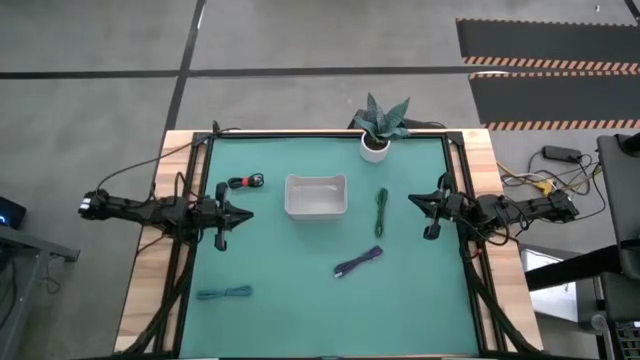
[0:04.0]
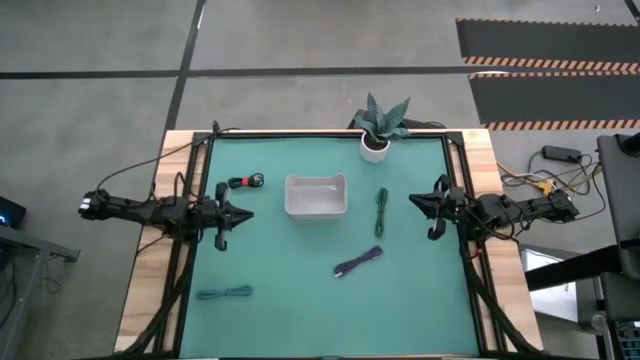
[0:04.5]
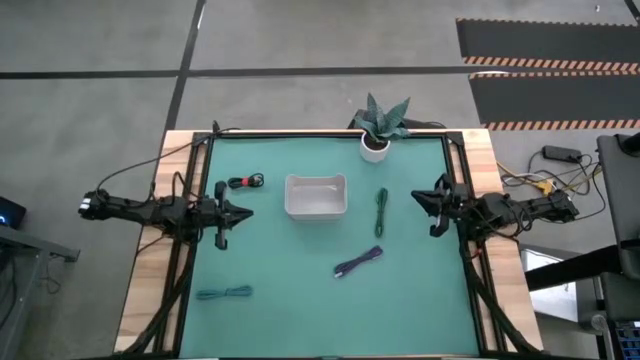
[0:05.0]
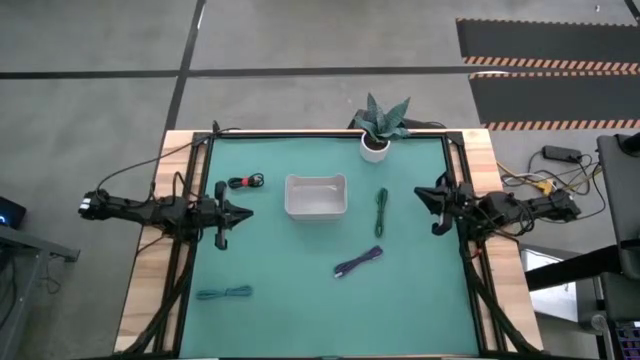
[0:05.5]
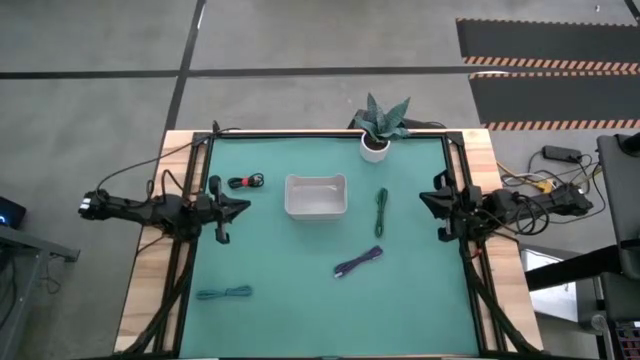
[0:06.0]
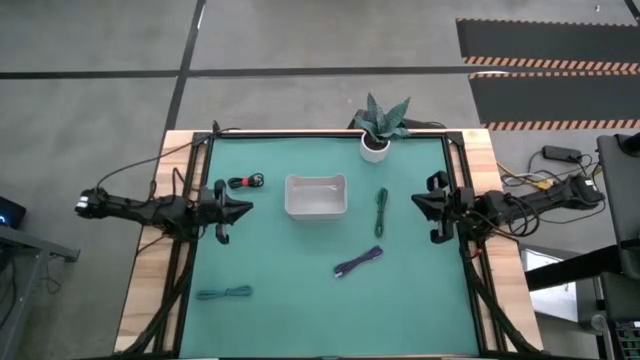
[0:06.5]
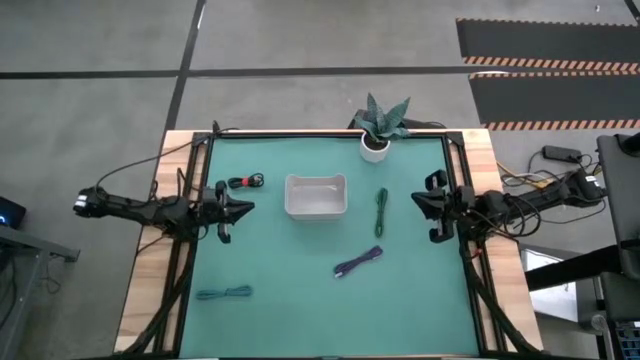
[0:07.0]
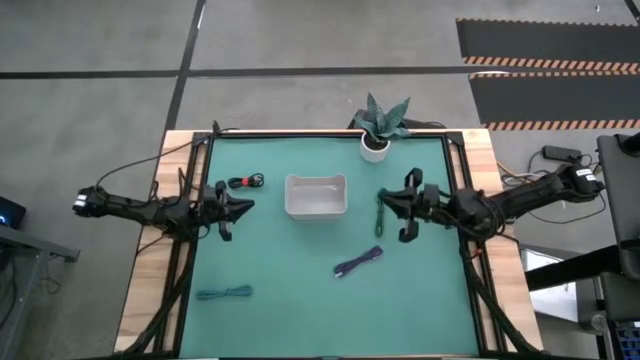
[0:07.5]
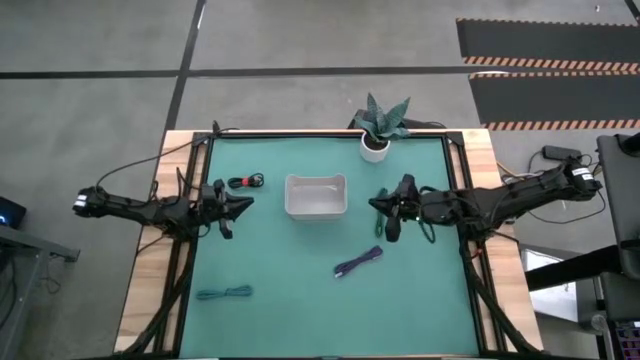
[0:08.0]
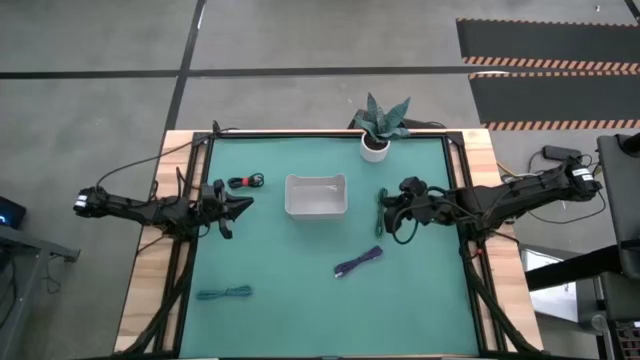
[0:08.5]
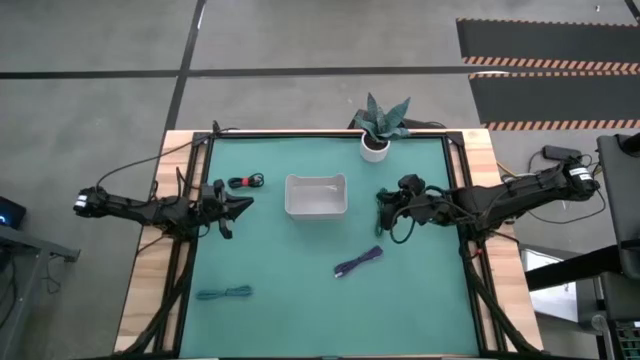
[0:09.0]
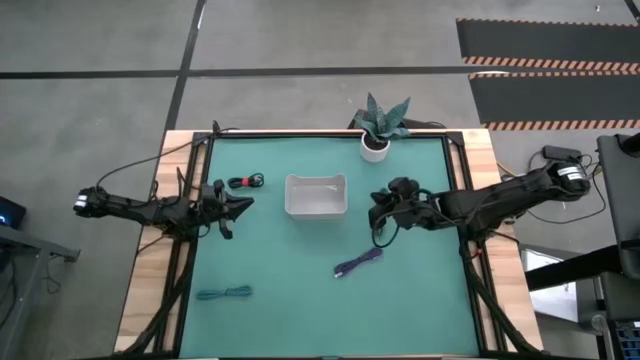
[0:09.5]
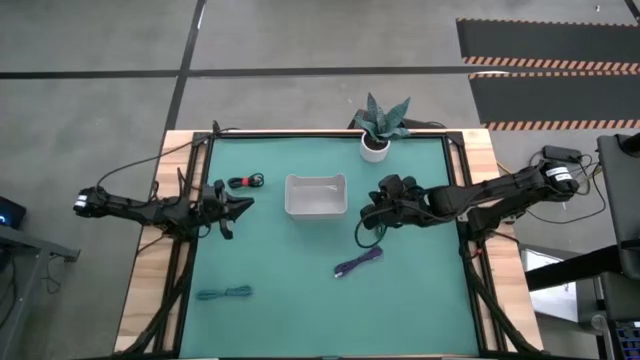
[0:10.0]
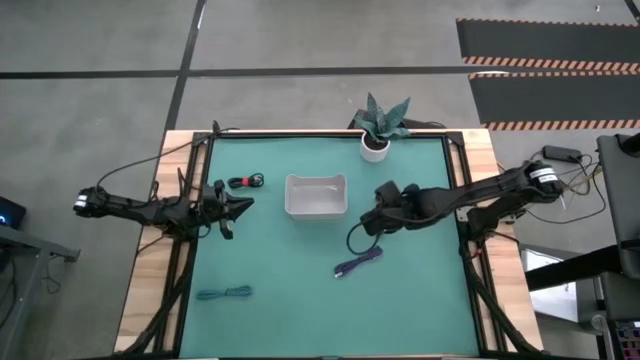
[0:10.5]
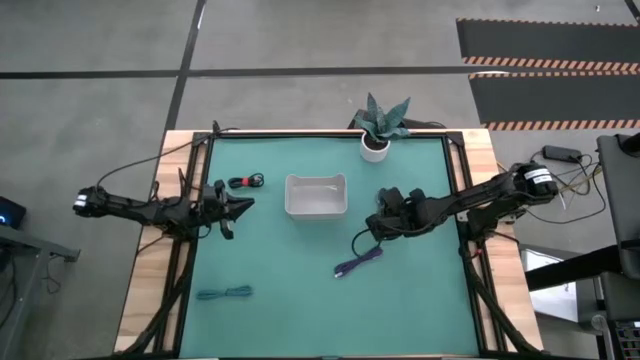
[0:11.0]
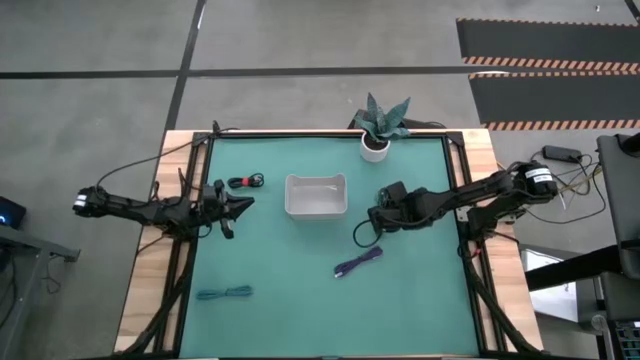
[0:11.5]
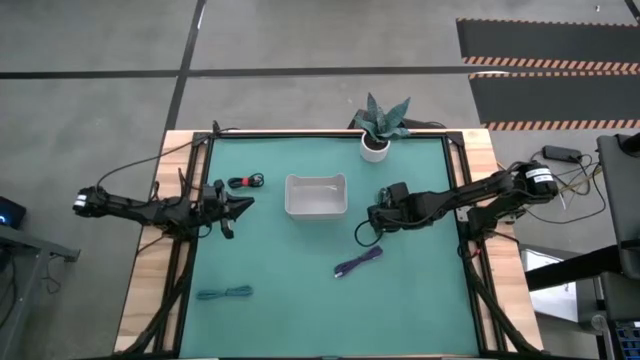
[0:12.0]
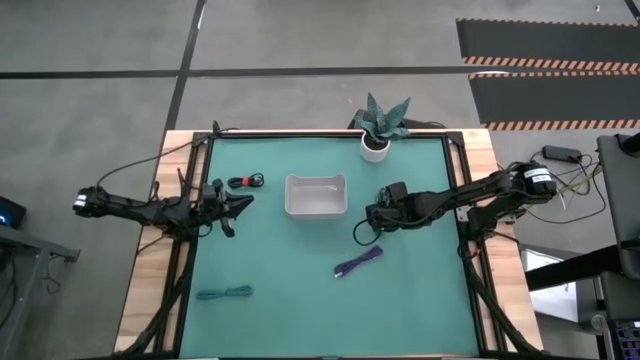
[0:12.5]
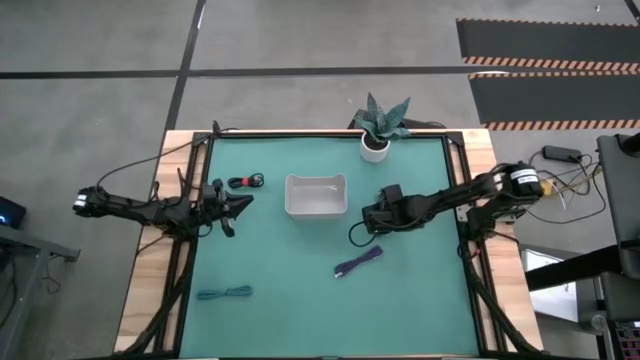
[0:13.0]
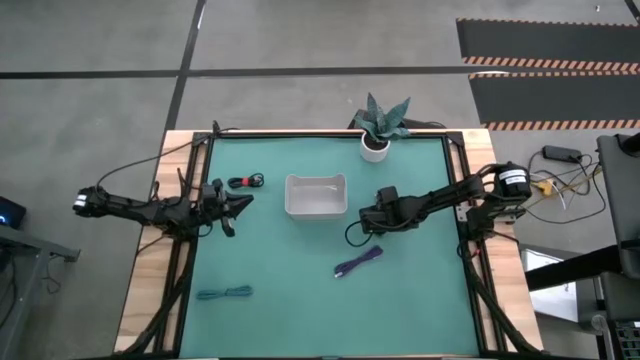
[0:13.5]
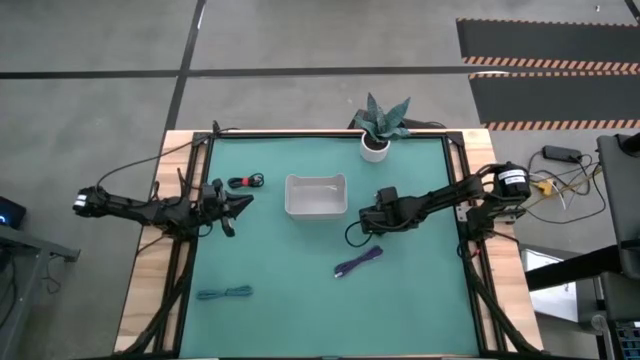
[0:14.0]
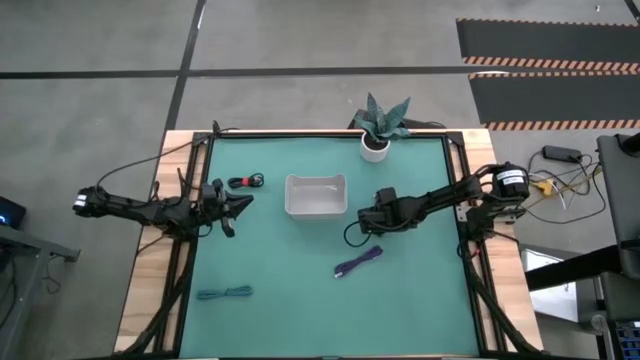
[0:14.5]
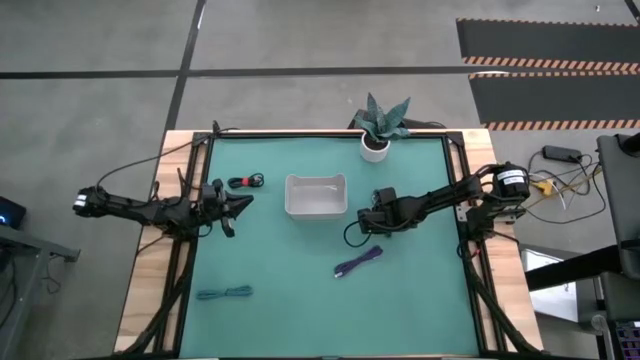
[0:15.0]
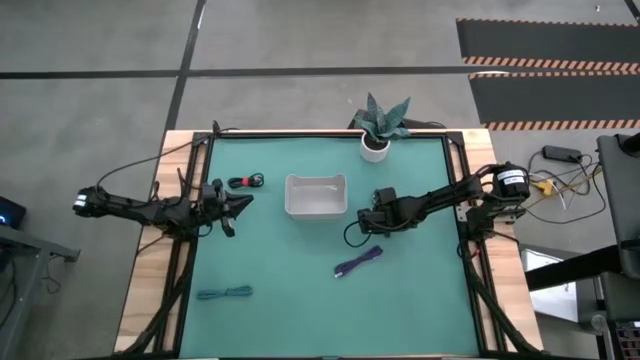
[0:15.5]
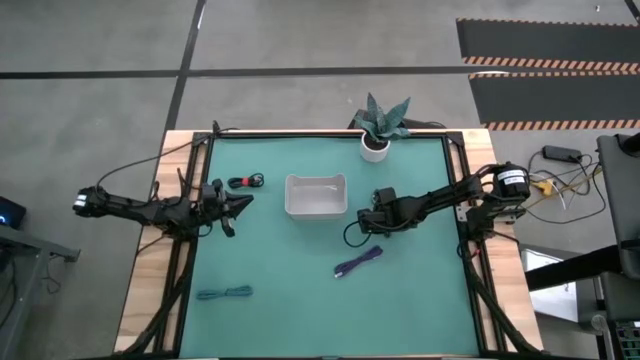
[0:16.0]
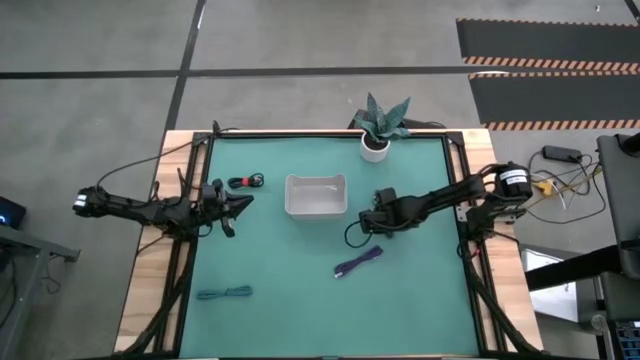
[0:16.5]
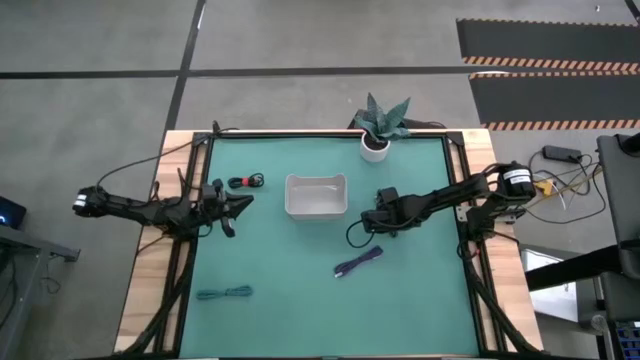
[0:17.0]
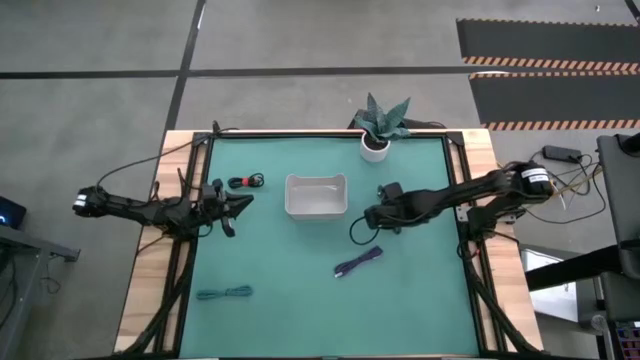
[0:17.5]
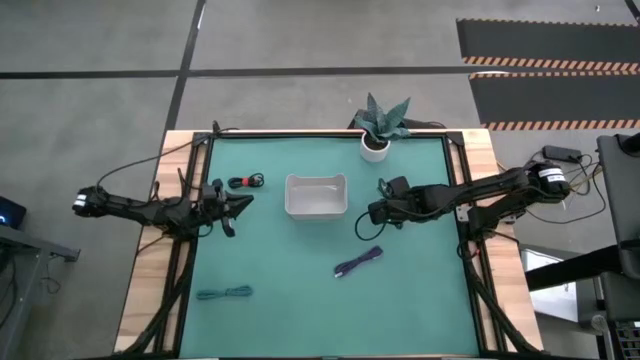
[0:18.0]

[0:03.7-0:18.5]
Task: Pick and place USB-C Cables
Put the green charger cable into the white bin

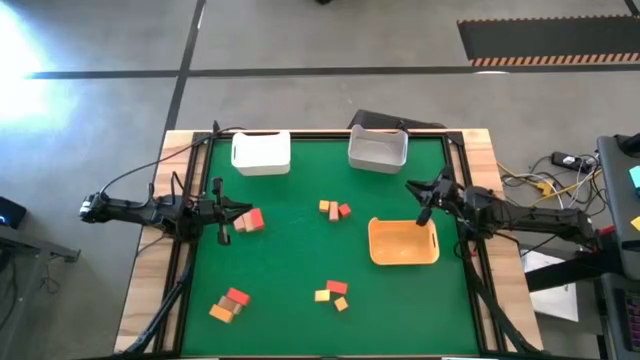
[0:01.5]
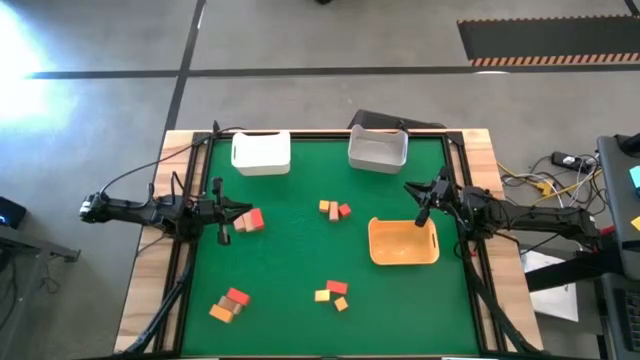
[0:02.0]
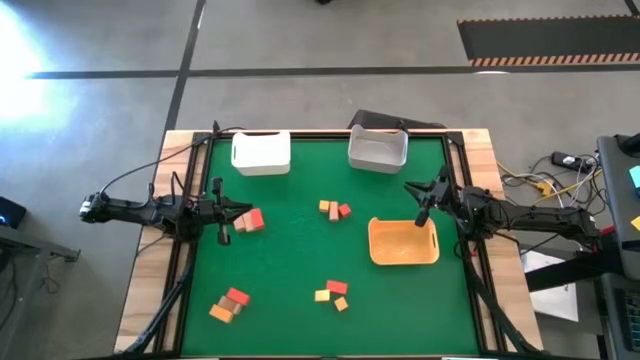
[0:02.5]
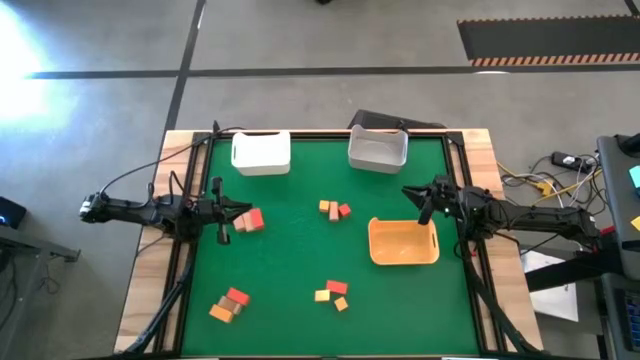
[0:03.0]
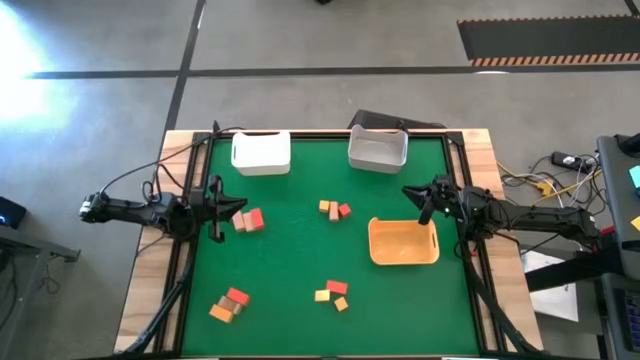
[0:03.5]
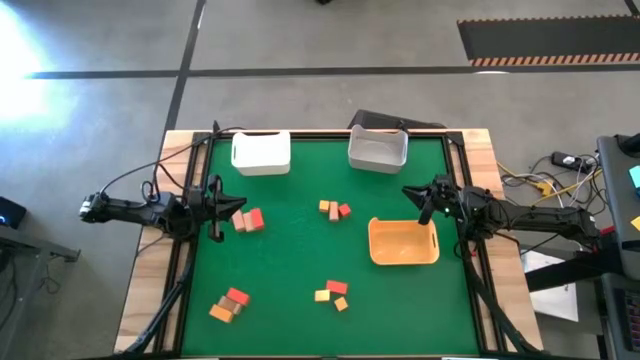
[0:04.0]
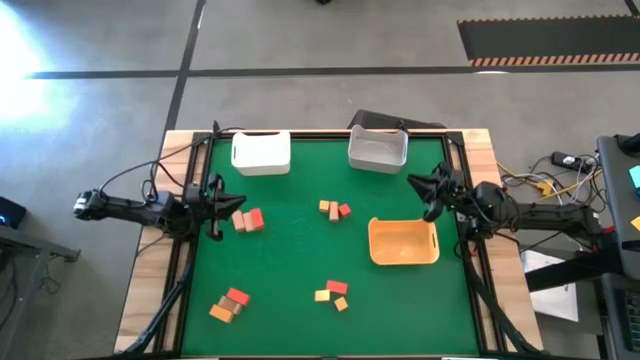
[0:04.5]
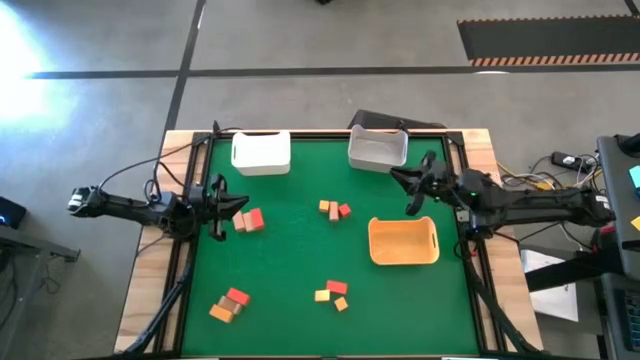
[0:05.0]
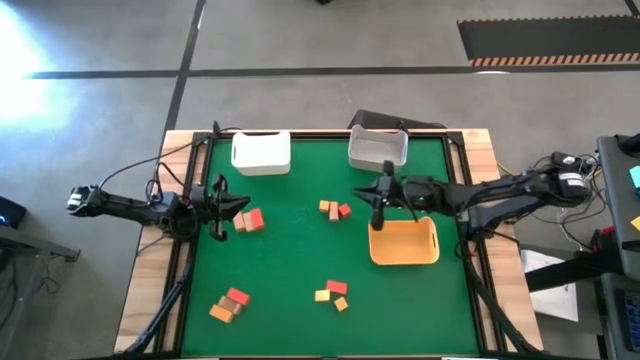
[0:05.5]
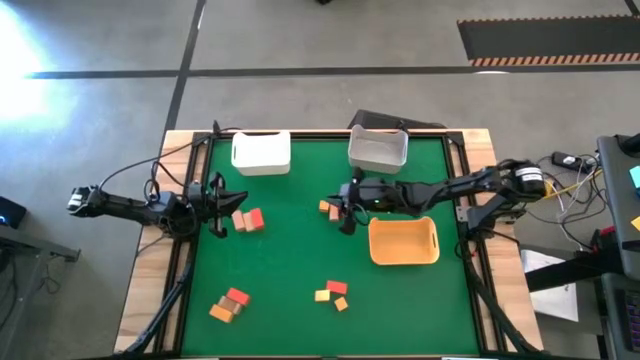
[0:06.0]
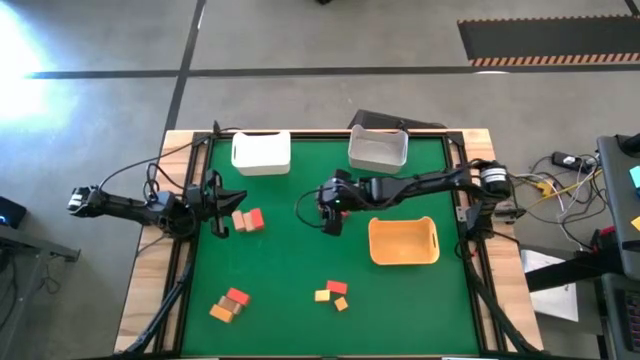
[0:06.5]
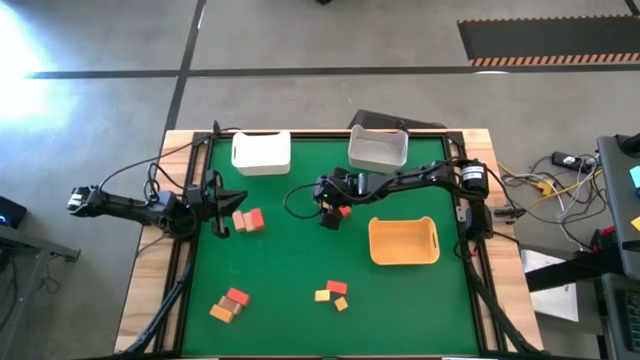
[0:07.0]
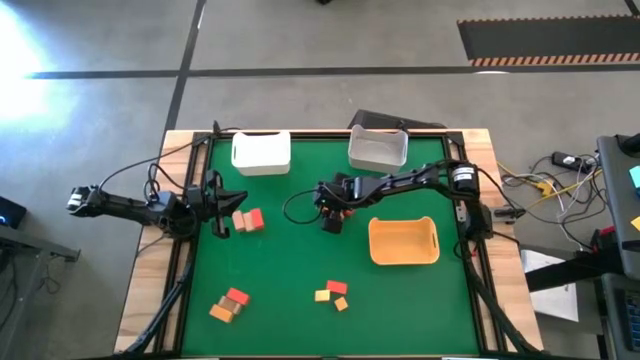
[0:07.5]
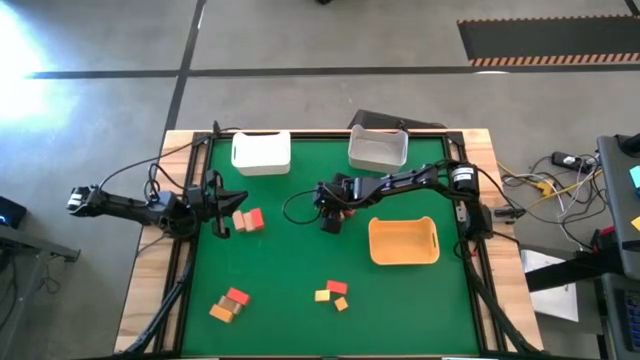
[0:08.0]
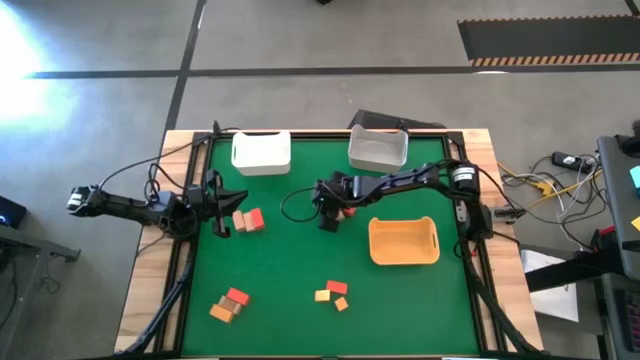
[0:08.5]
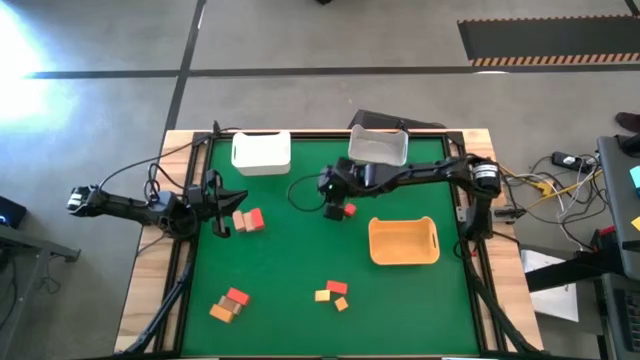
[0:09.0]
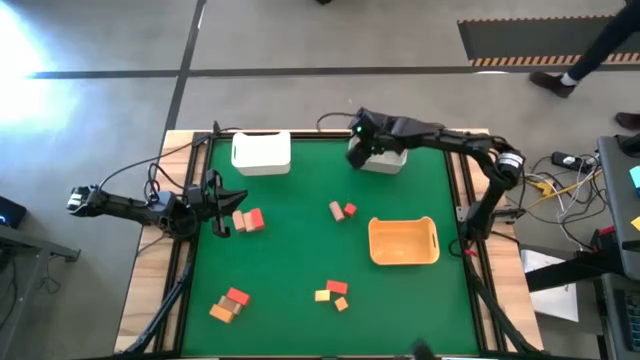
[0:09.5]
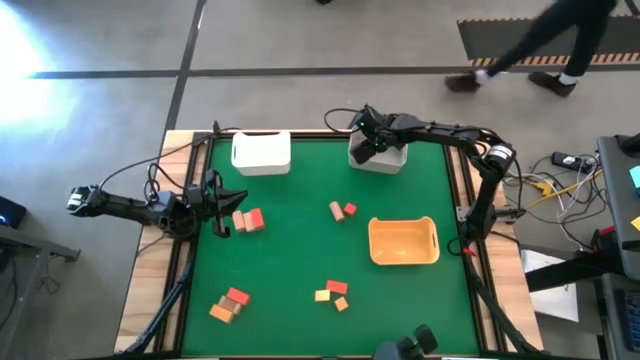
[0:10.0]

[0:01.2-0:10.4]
Task: Sort & place blocks by color
Put the yellow block into the gray bin
